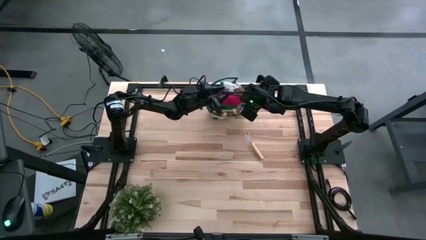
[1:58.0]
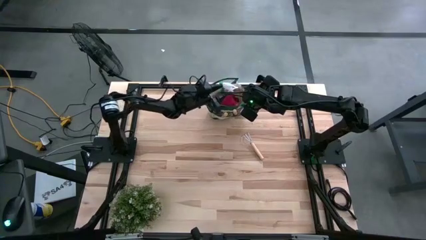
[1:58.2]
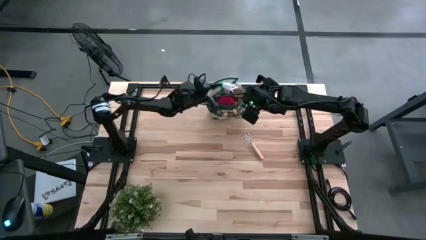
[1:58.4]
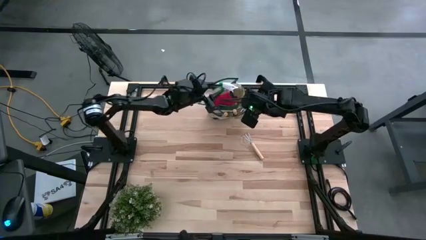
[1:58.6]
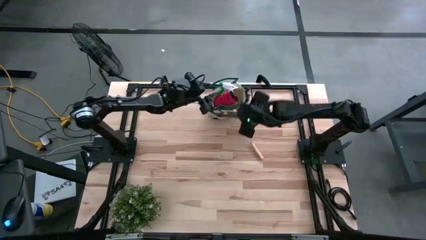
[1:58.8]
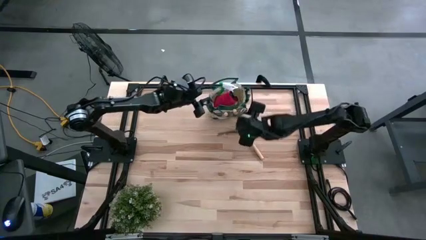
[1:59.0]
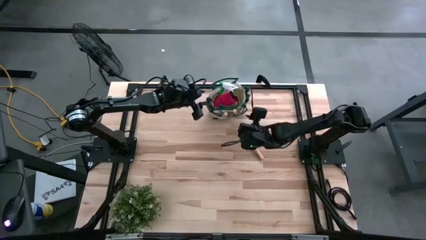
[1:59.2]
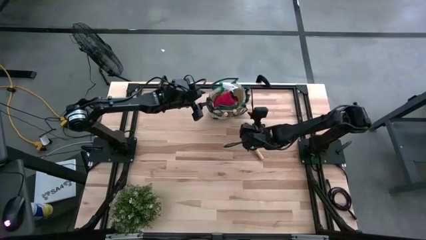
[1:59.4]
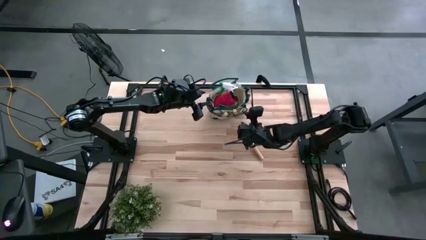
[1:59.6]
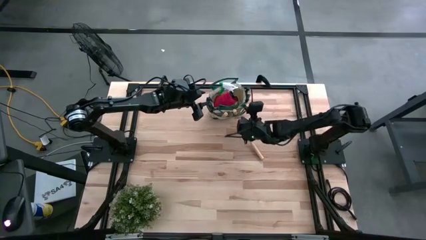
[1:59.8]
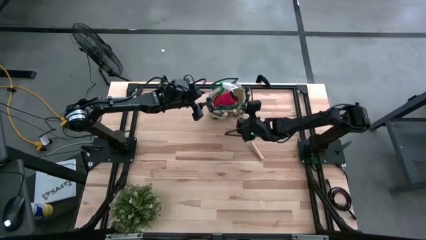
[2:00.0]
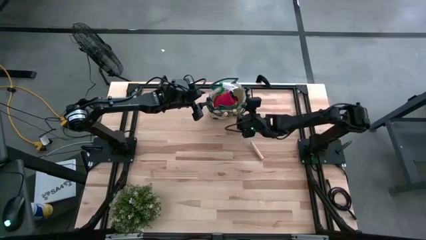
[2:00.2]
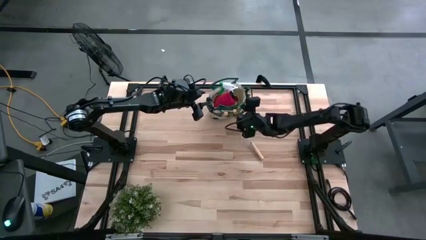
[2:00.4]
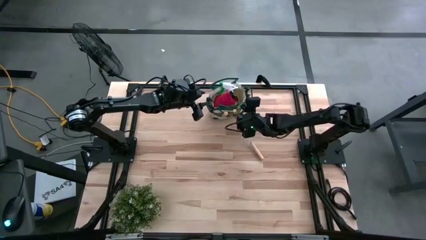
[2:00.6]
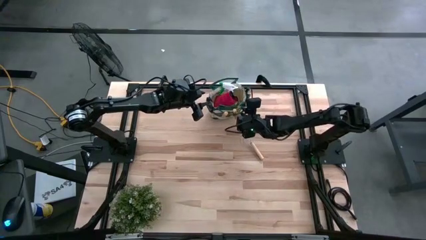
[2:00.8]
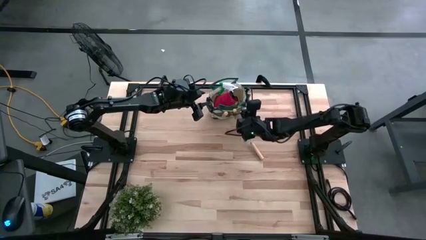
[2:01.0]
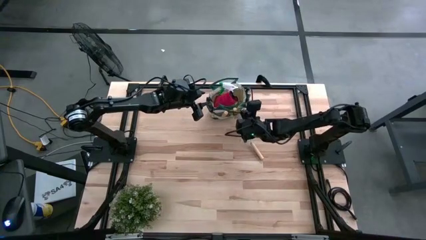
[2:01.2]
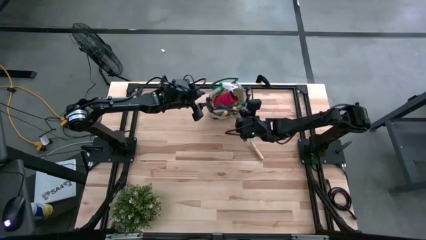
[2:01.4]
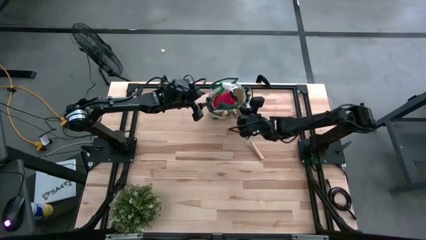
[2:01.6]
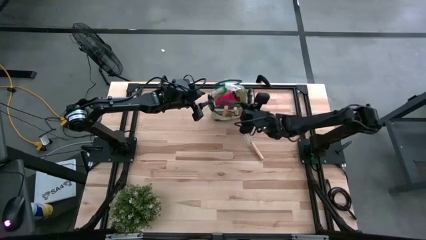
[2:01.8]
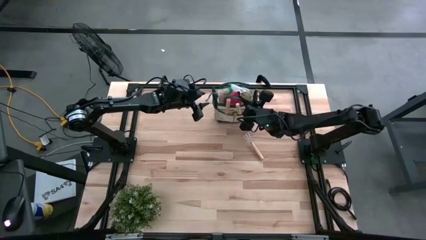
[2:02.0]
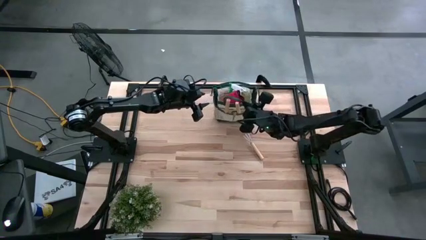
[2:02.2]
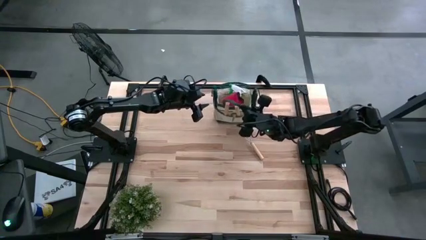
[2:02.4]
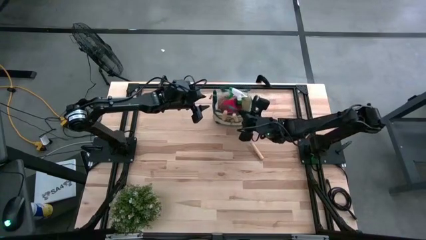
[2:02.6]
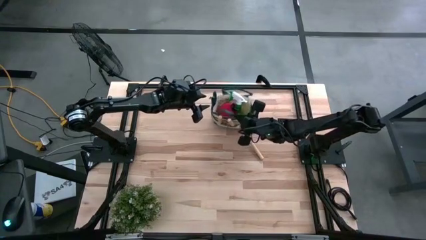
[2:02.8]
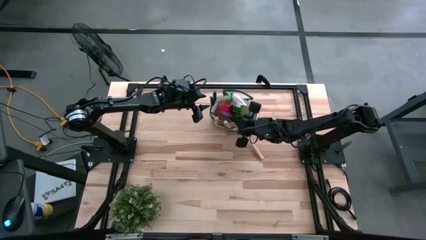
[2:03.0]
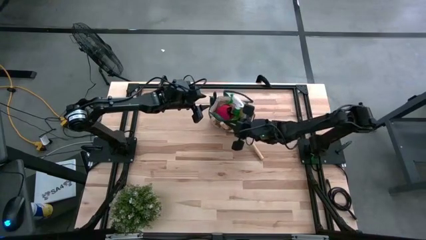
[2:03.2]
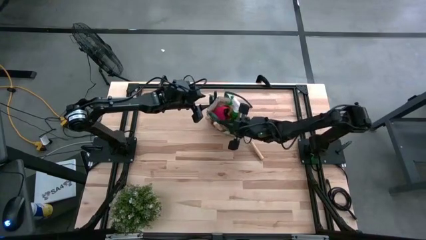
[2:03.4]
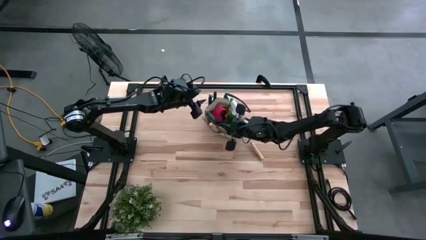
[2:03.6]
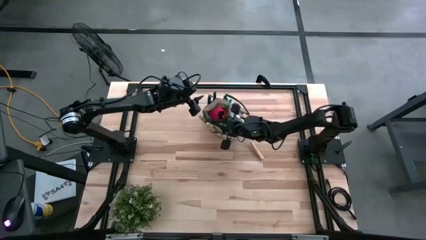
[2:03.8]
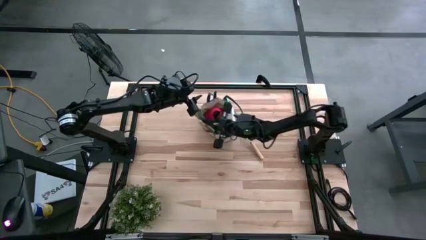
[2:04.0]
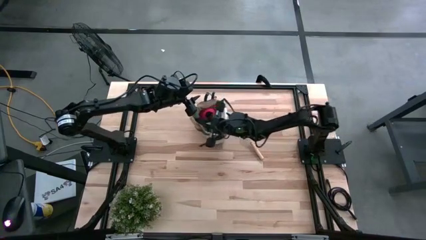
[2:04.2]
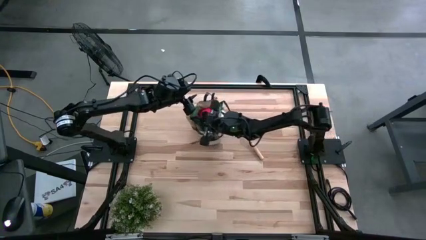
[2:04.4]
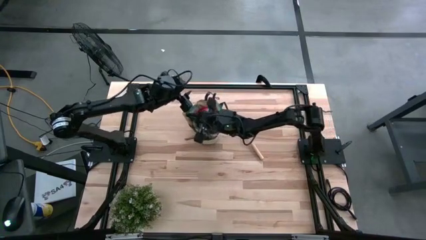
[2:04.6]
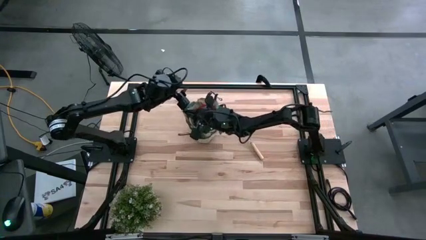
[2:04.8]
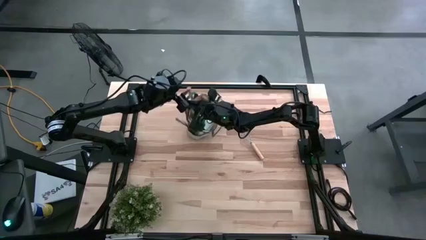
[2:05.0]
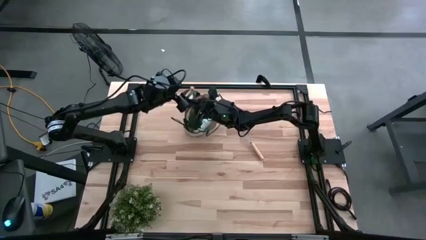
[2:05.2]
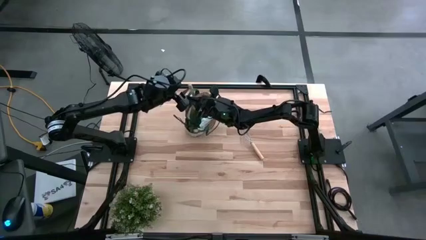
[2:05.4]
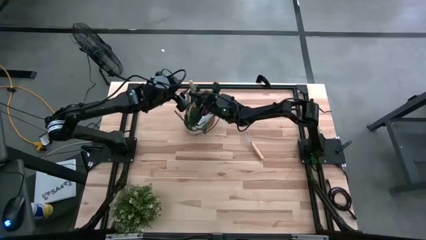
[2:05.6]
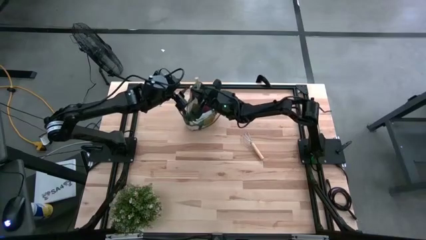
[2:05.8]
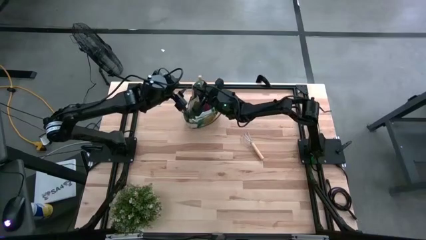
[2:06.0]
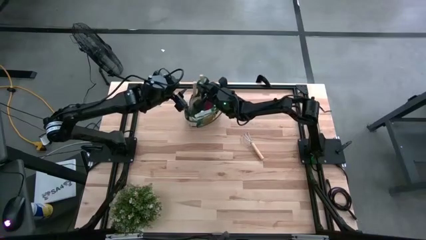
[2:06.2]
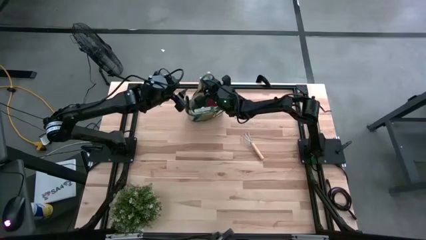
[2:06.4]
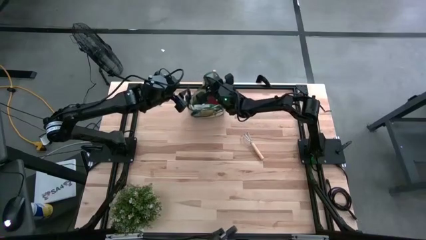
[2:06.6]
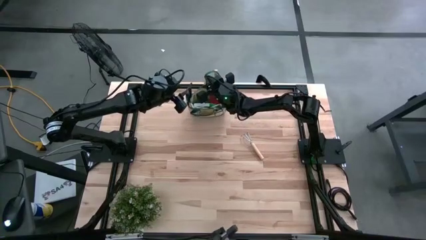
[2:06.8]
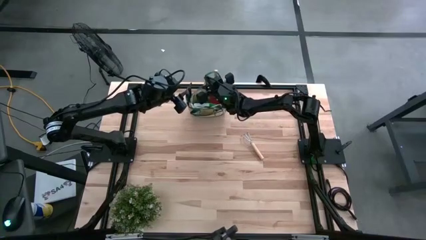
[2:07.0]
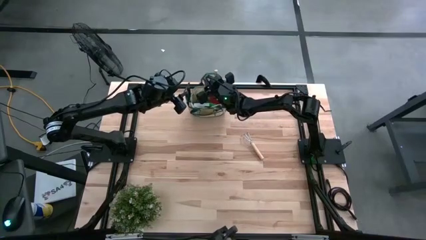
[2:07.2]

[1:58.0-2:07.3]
Task: Pick & Place Garden tools in Gardening bag
Adjust the gardening bag

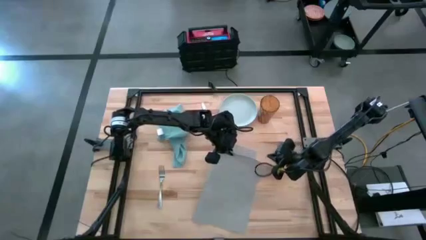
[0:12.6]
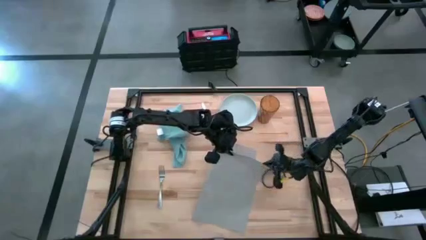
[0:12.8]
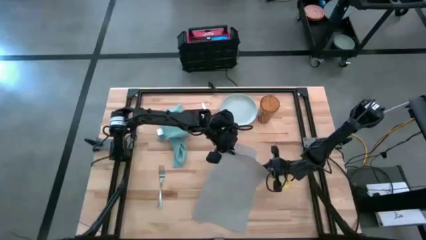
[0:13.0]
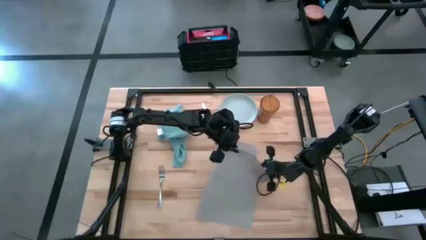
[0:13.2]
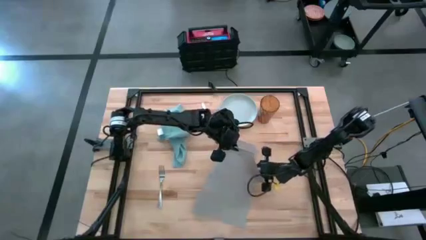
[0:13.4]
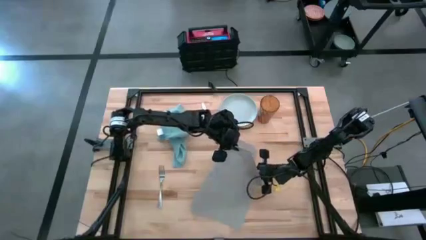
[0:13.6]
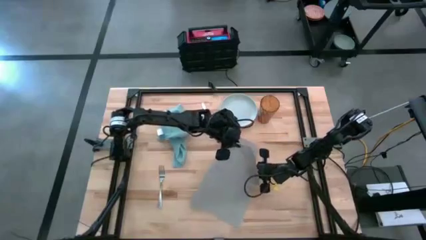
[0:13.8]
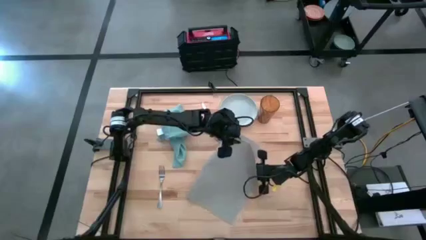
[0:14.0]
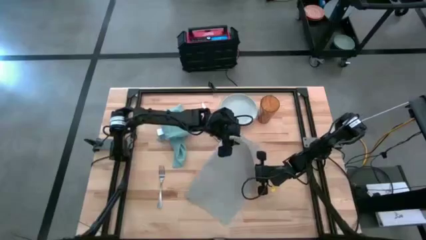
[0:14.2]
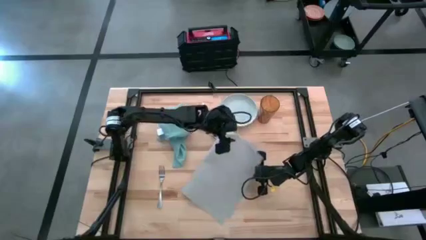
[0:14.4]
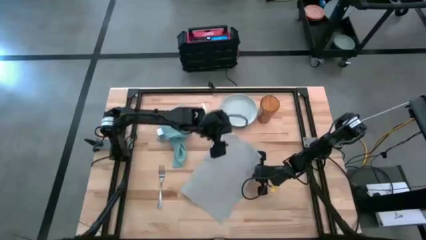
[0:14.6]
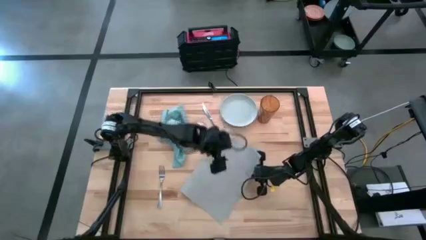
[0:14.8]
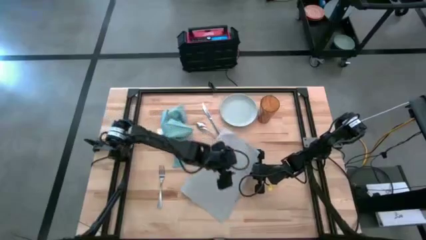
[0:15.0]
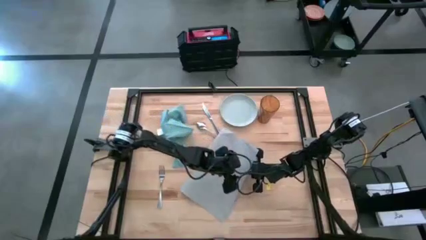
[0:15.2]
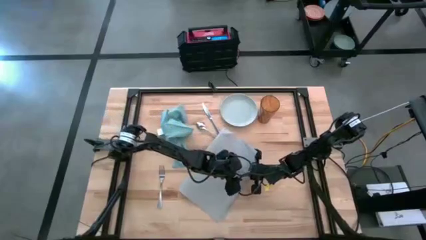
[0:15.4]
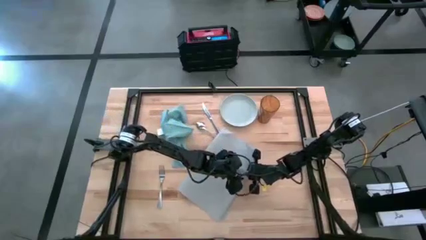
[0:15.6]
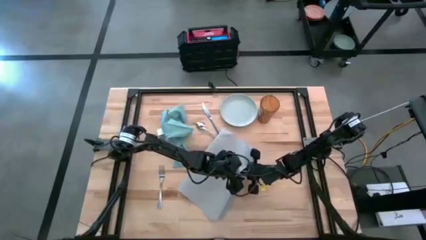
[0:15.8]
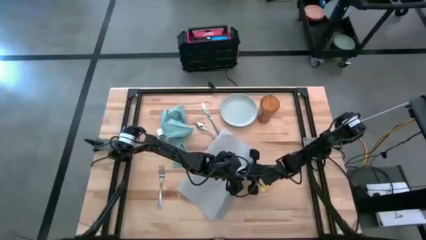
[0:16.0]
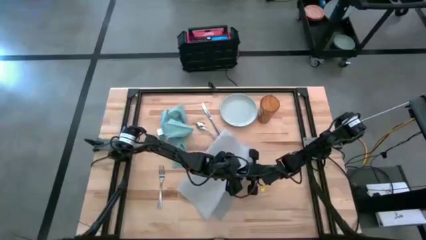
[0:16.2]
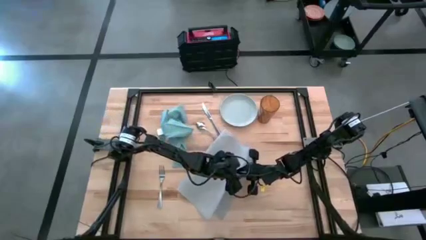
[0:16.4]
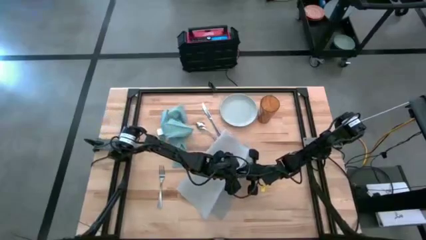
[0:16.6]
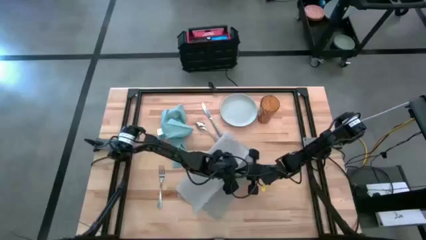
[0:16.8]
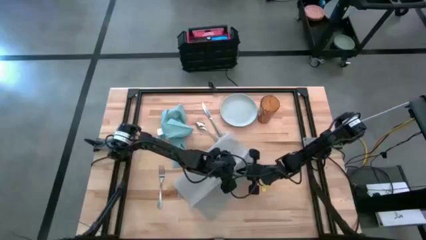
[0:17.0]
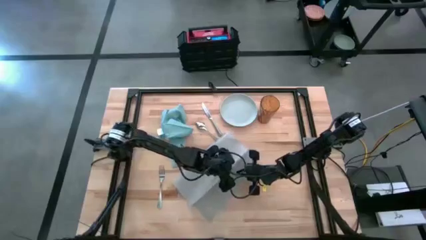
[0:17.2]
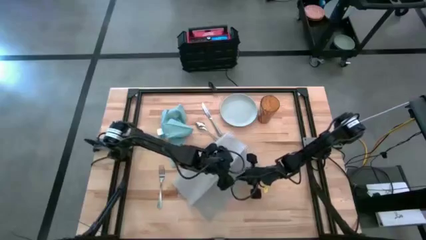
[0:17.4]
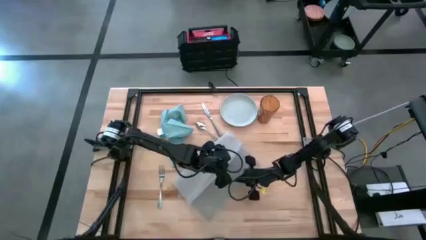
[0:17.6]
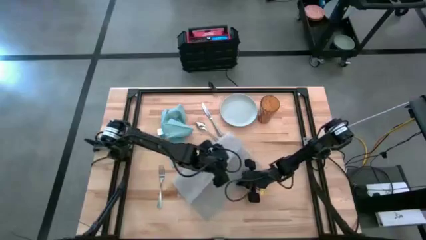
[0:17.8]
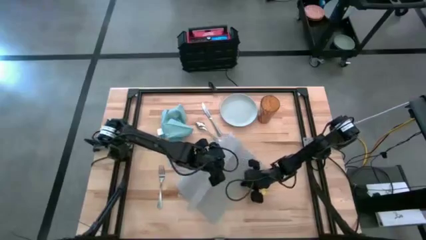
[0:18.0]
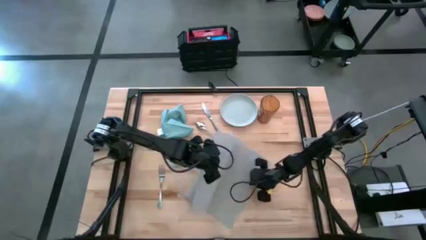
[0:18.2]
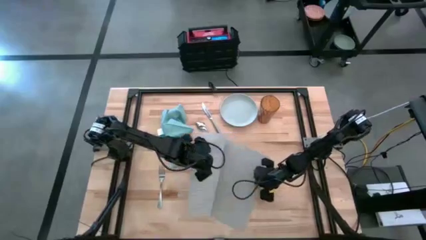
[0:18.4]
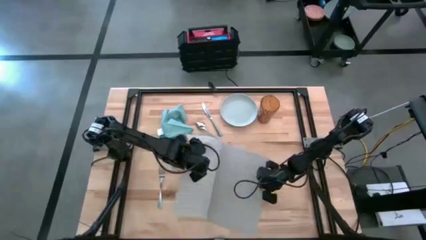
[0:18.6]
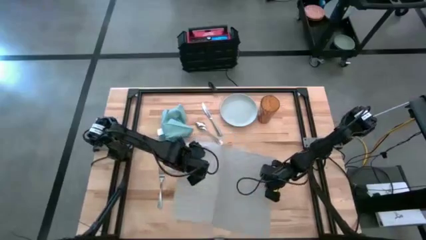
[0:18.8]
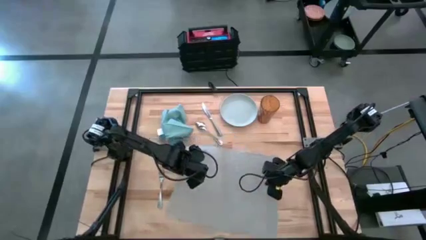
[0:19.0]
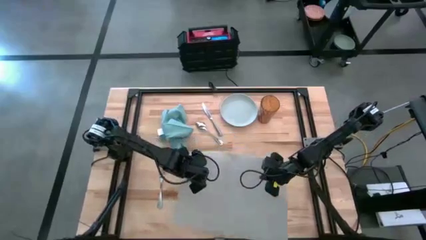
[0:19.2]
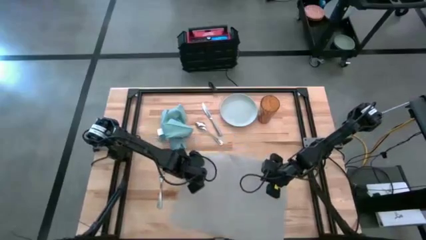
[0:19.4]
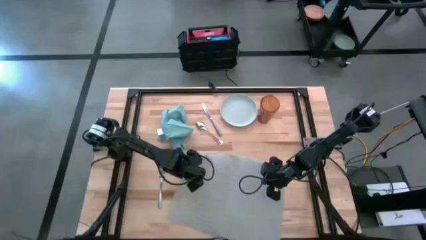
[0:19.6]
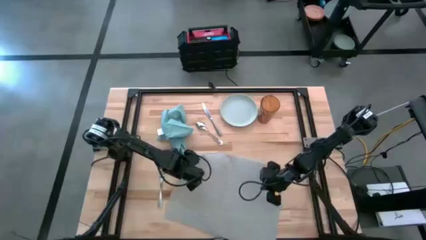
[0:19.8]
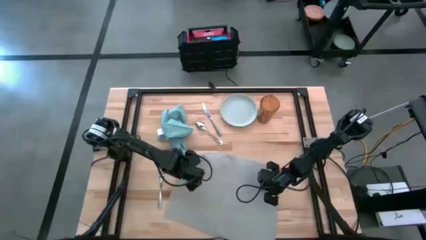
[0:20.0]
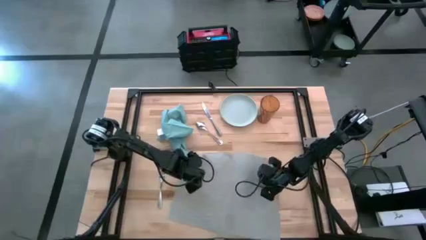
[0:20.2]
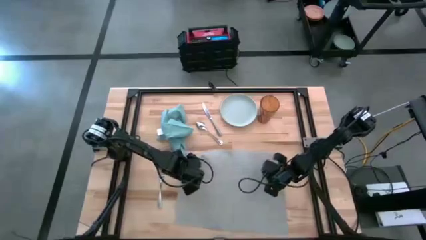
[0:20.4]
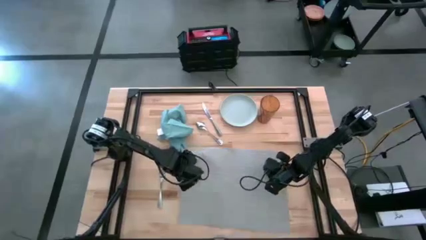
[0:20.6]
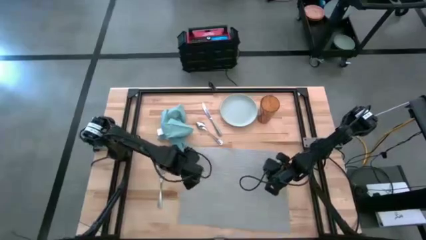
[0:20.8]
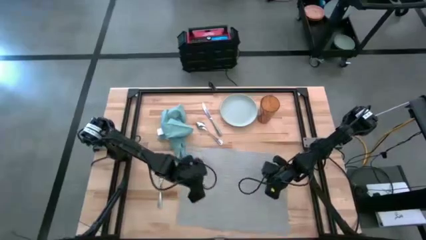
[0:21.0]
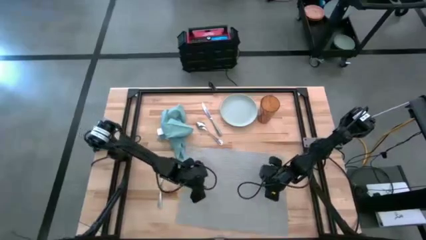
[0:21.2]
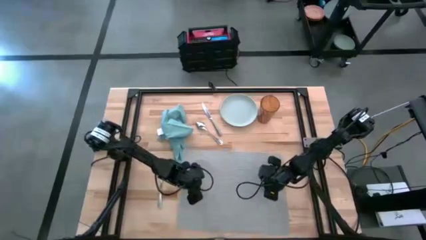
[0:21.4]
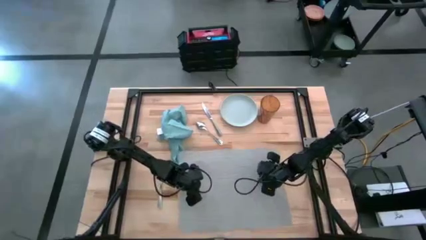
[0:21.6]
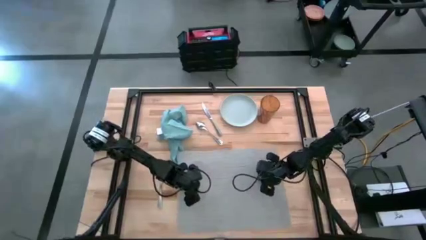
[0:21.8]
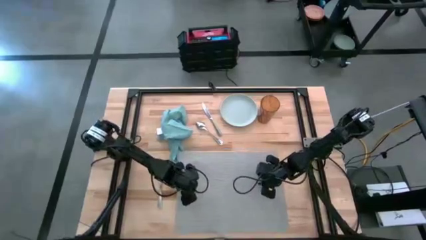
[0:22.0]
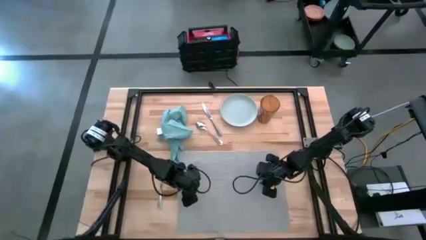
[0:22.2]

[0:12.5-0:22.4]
Task: Set table place
Prepare the gray placemat
